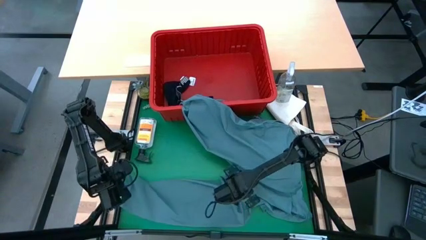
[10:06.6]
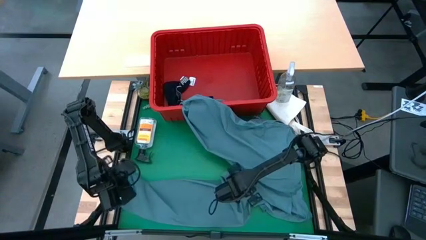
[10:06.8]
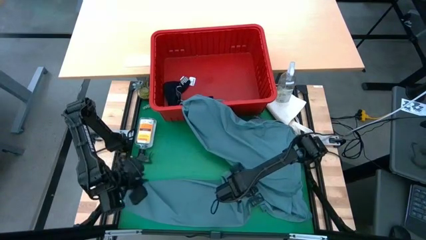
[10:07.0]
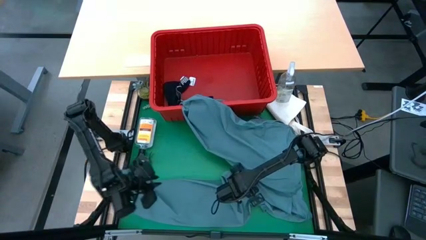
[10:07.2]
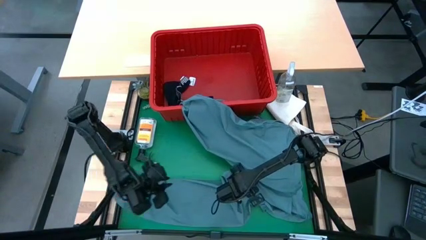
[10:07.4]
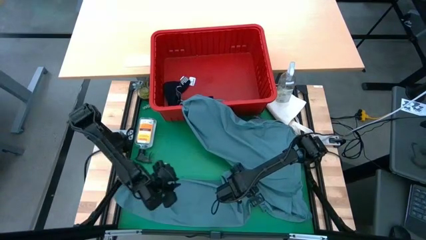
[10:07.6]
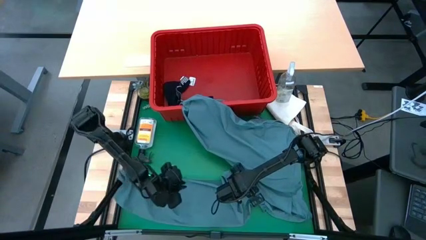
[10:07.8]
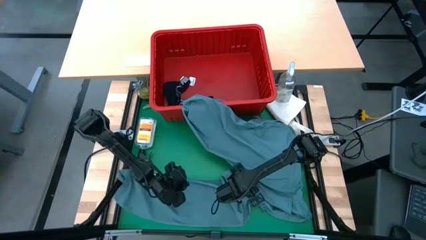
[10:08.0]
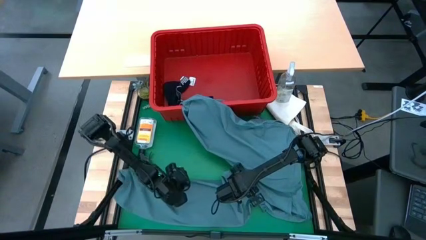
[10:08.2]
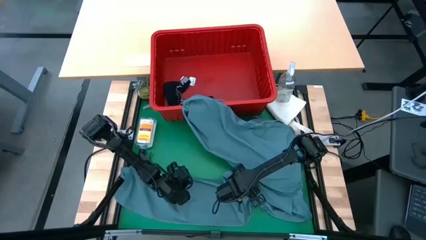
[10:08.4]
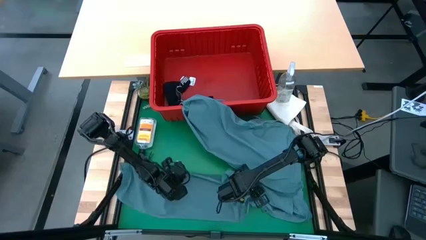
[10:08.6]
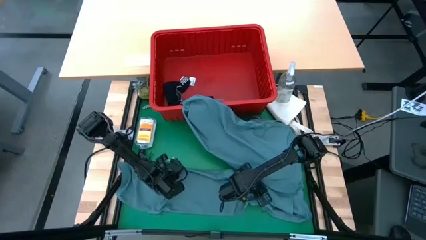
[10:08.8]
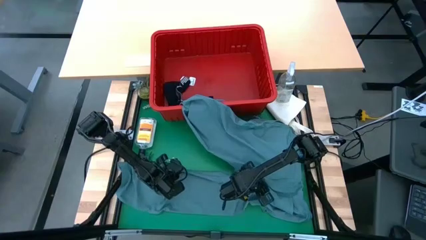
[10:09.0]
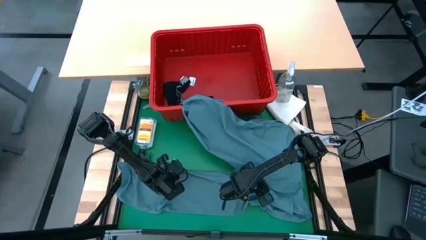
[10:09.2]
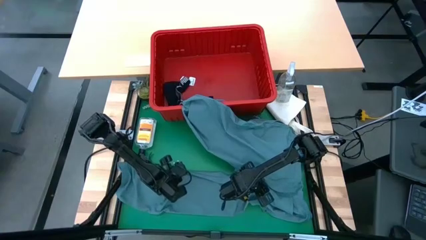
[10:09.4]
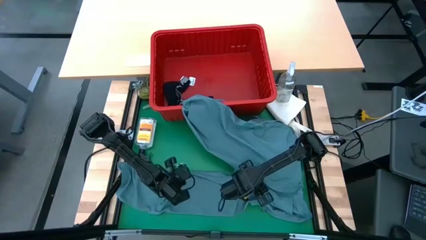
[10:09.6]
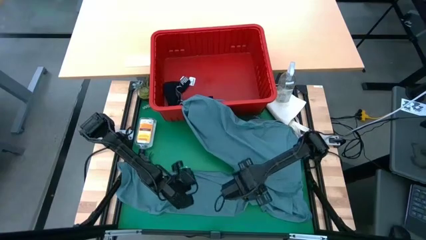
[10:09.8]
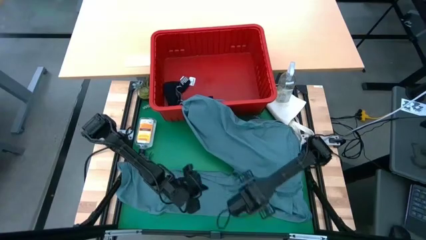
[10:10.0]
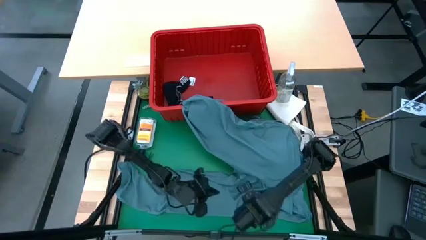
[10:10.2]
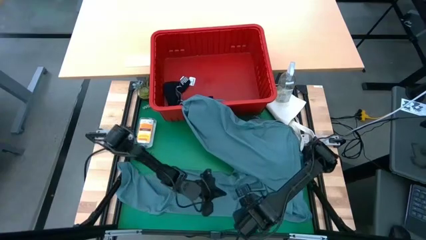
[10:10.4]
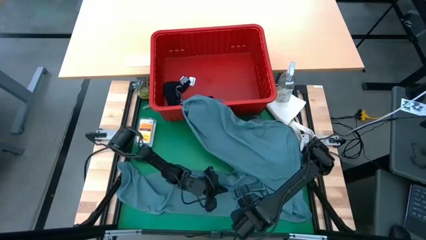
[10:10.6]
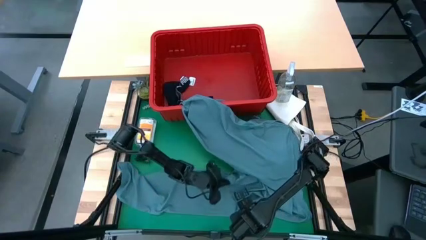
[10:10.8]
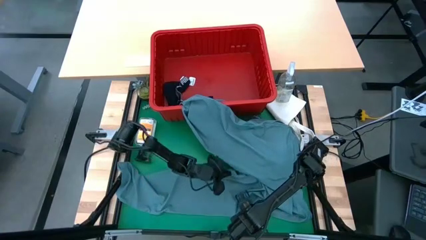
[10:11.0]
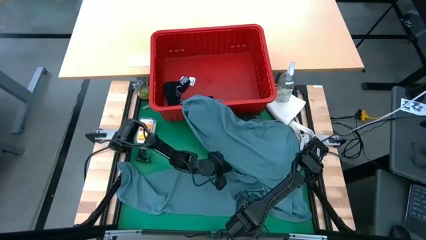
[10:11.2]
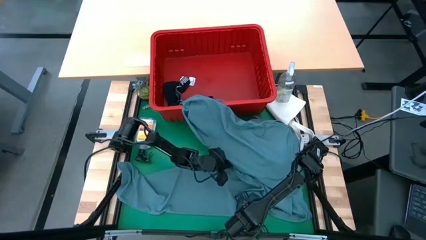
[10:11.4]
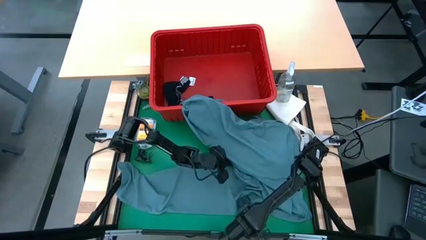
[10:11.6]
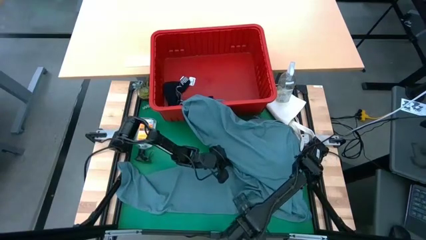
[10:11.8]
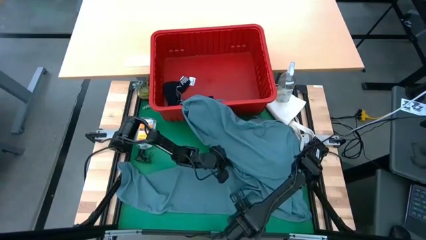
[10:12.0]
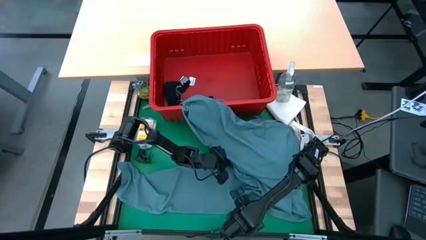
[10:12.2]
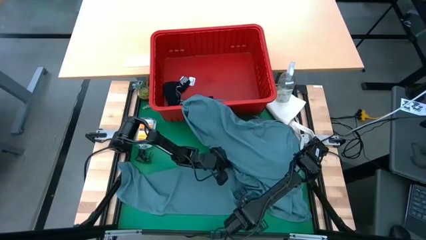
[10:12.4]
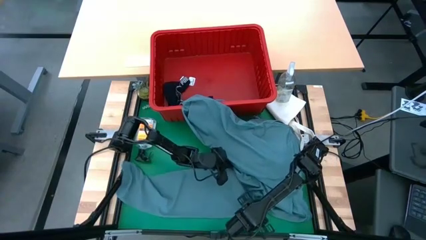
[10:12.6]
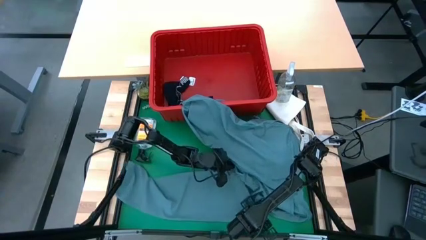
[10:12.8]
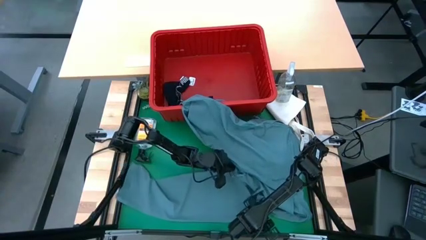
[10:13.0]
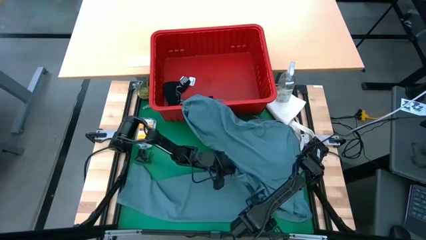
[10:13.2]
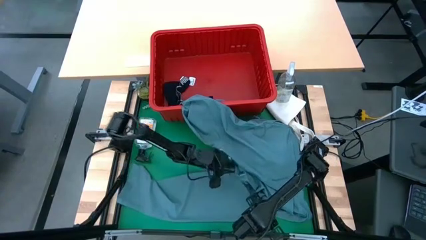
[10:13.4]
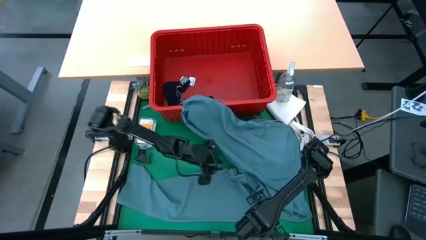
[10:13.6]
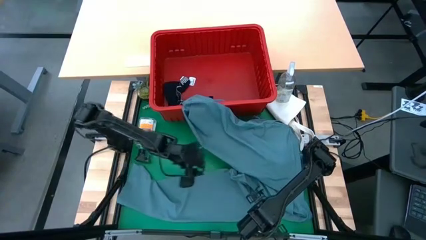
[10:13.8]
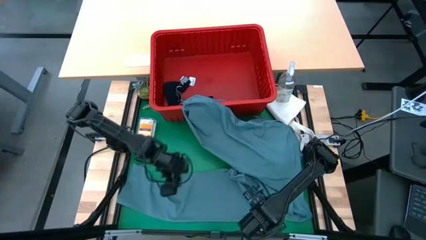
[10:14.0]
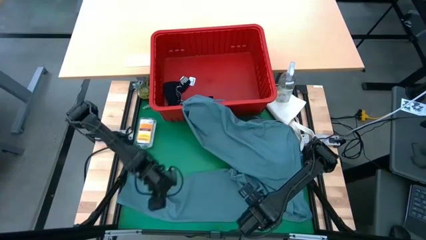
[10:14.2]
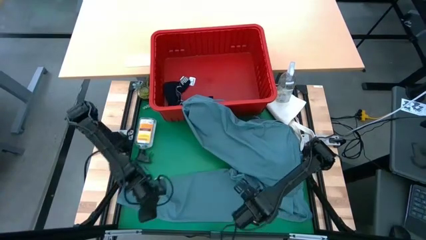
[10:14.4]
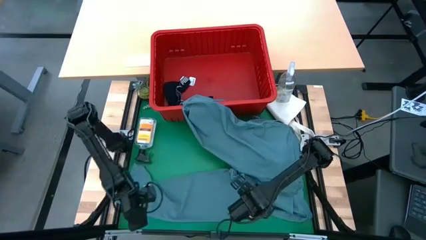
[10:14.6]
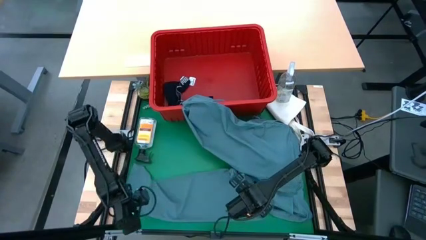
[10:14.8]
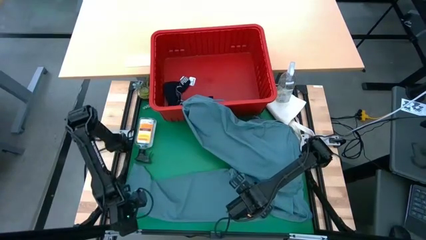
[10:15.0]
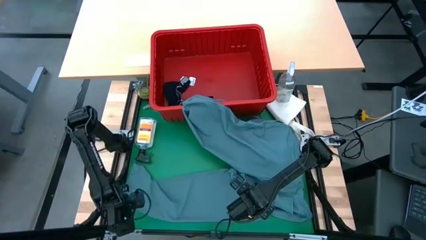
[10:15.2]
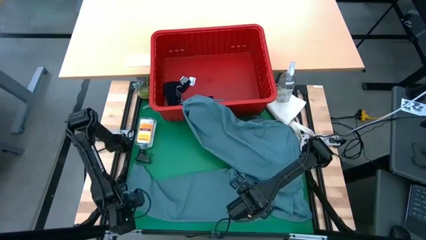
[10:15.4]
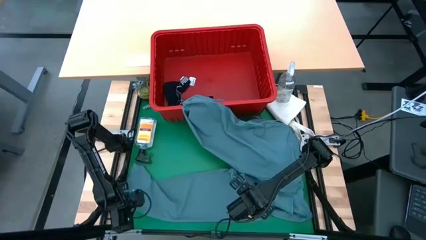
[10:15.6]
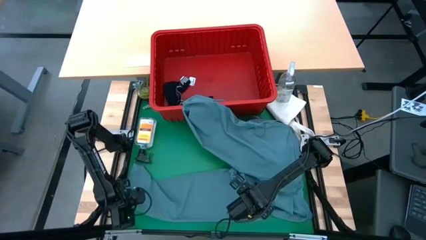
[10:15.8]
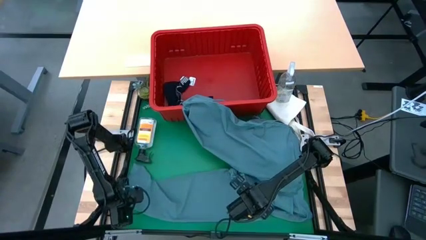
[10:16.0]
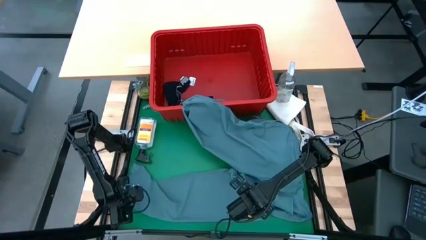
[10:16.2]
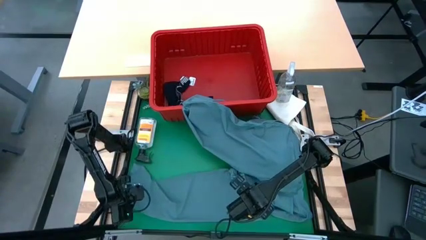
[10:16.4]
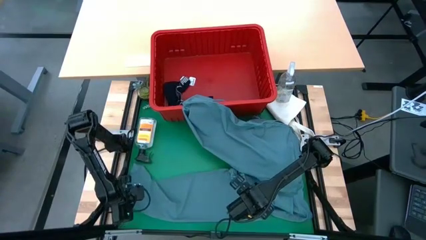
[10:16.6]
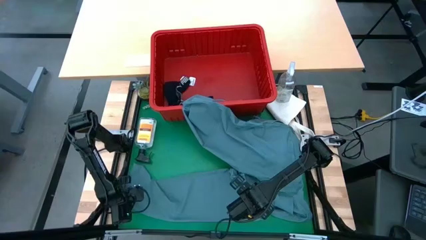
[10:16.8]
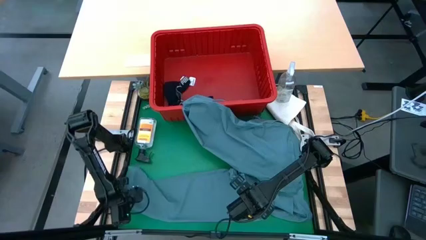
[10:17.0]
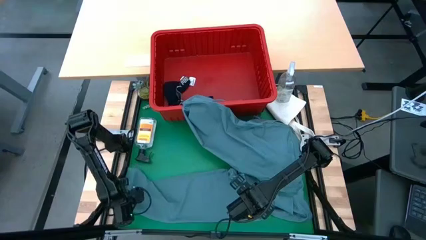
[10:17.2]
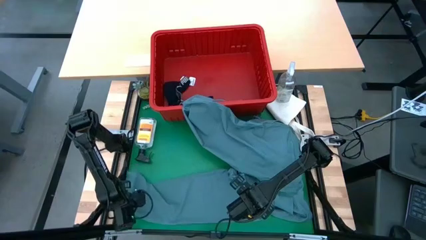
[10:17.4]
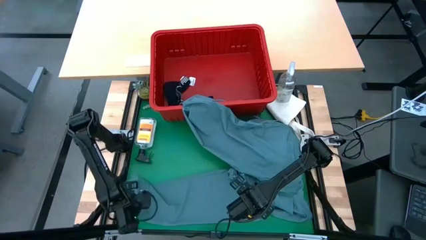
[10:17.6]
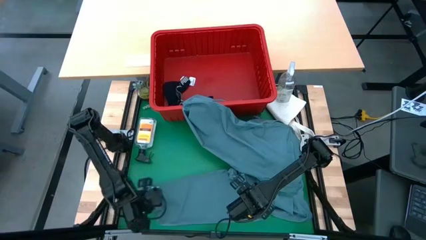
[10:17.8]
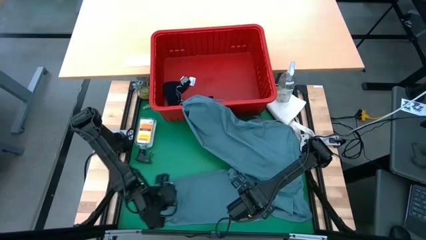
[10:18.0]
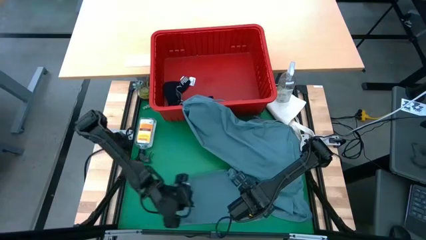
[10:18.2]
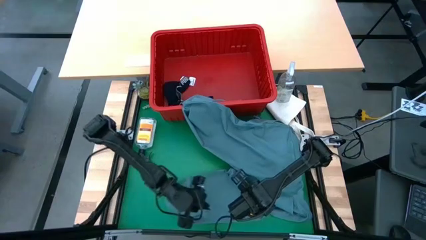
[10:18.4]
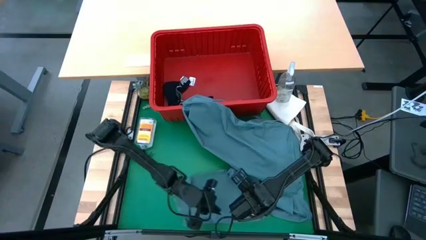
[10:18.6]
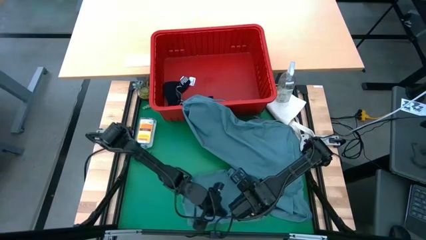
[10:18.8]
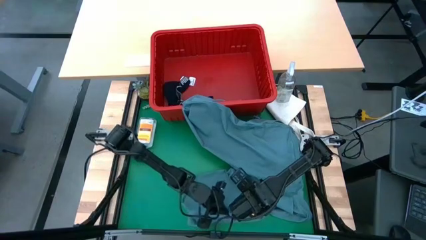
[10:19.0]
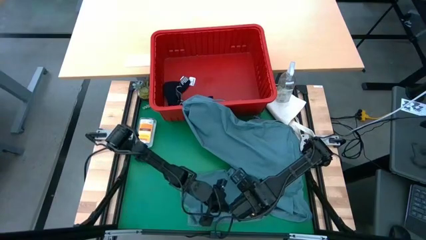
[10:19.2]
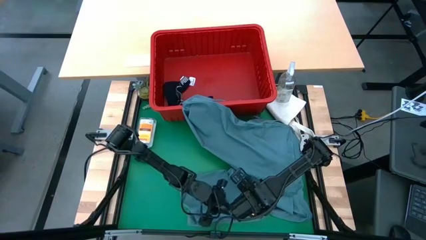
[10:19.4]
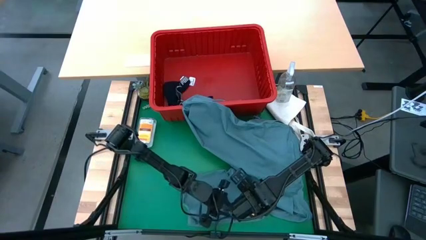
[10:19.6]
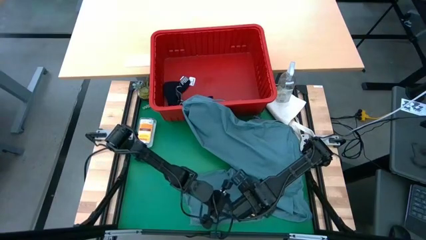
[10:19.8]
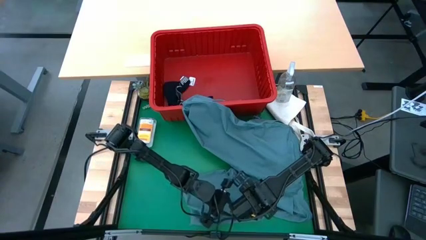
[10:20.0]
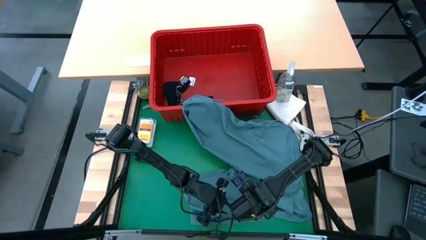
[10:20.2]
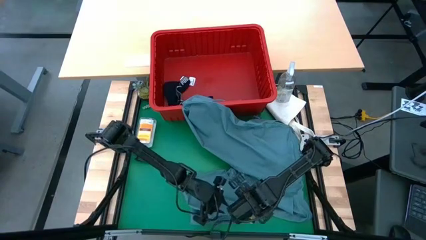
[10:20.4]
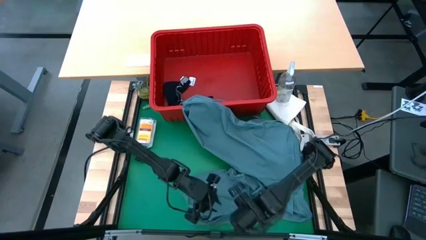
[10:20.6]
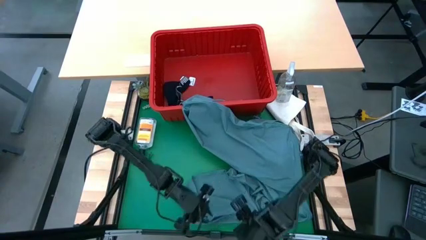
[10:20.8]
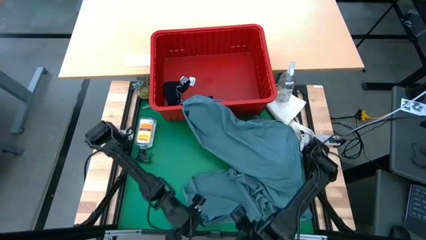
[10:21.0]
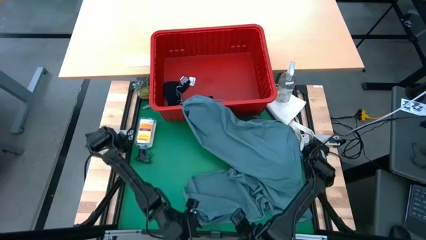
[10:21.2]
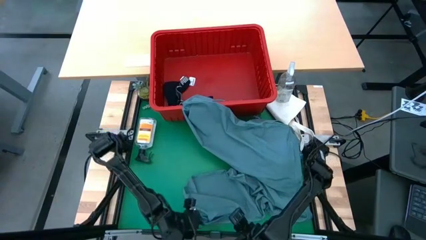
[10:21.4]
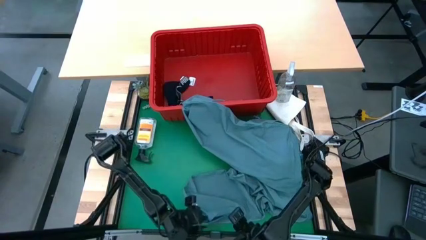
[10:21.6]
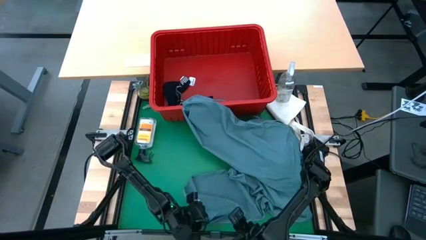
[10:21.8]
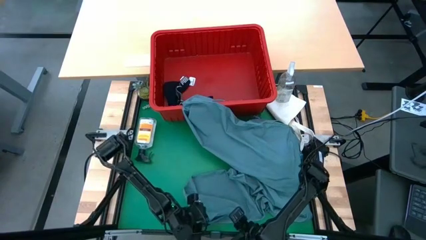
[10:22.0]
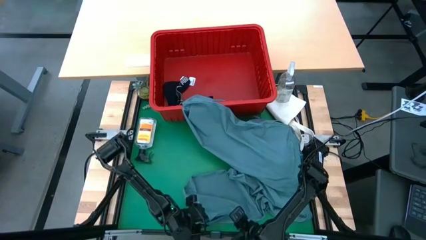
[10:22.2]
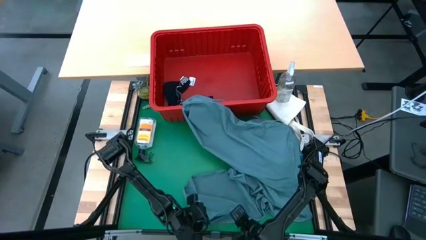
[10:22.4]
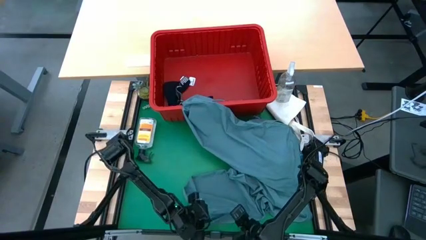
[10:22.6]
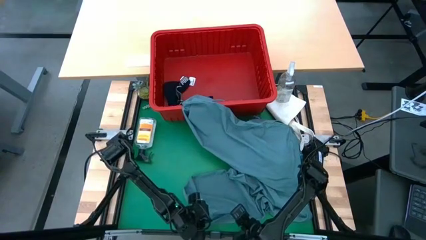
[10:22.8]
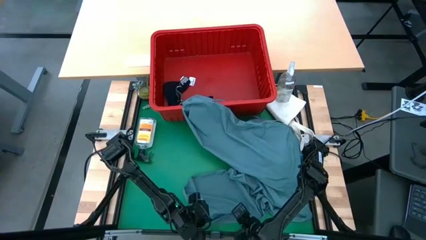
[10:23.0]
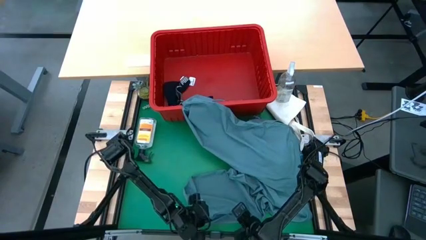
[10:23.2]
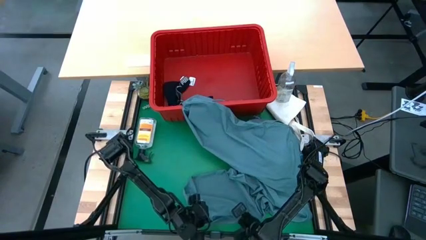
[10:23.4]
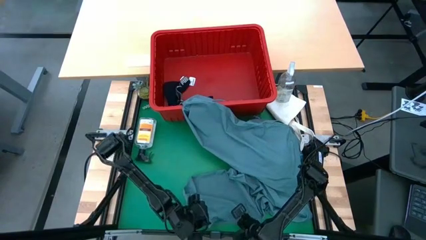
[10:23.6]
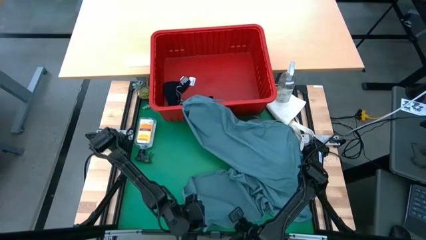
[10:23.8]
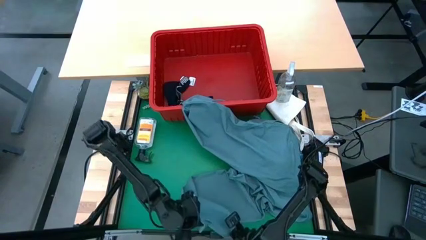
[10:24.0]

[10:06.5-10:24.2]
Task: Fold Laundry from Bin
Fold the blue pants on top of the blue shirt
